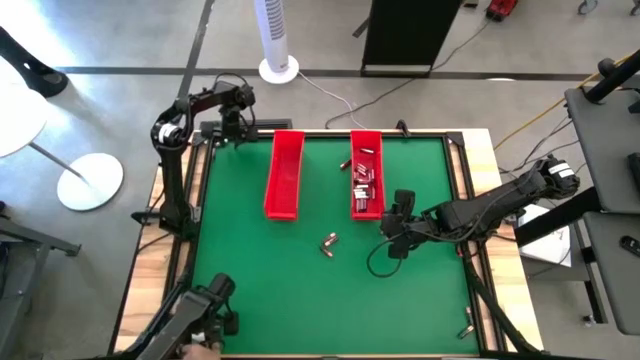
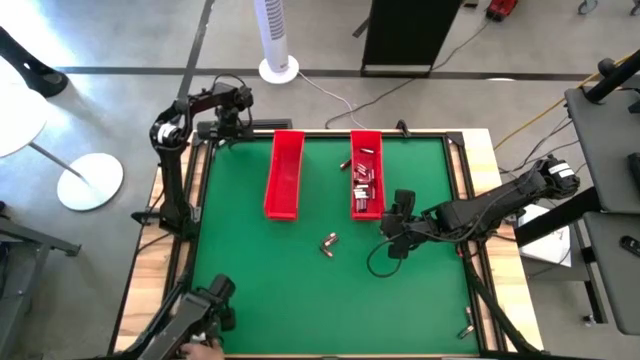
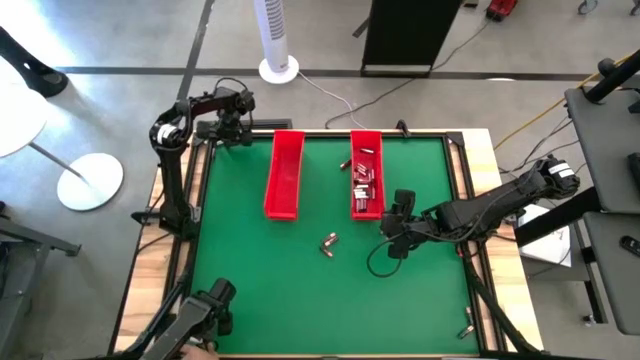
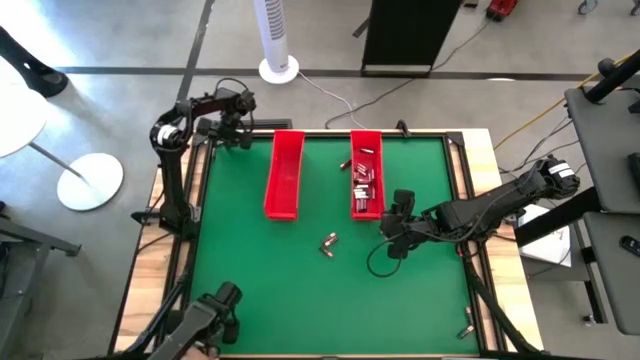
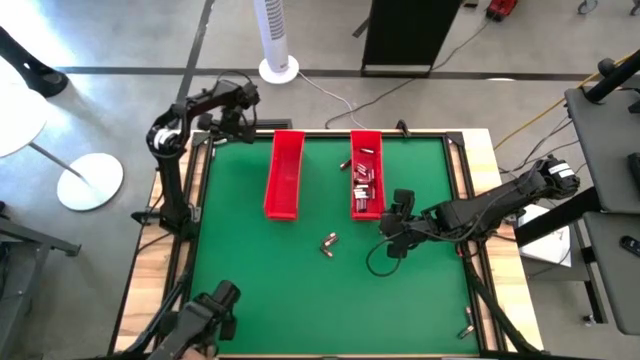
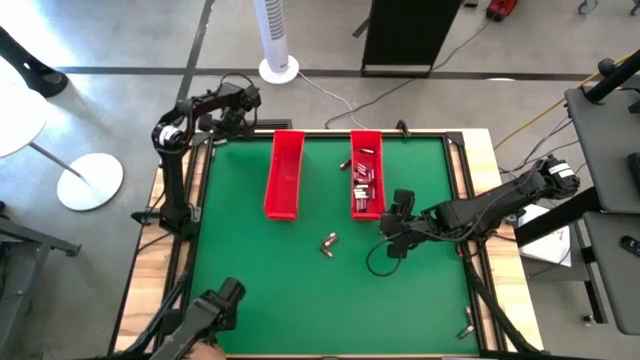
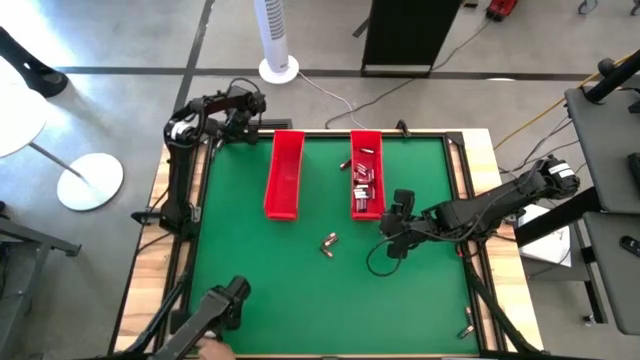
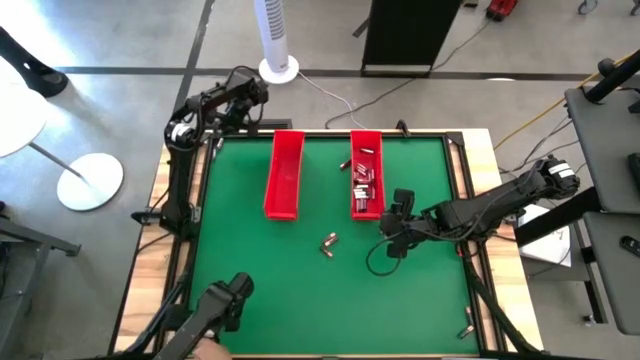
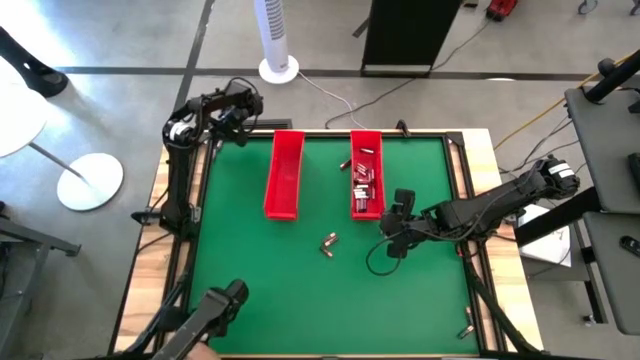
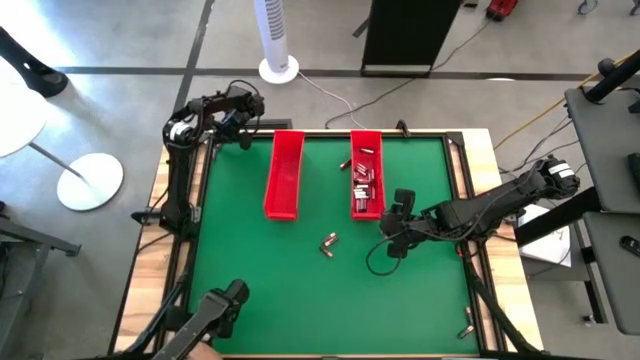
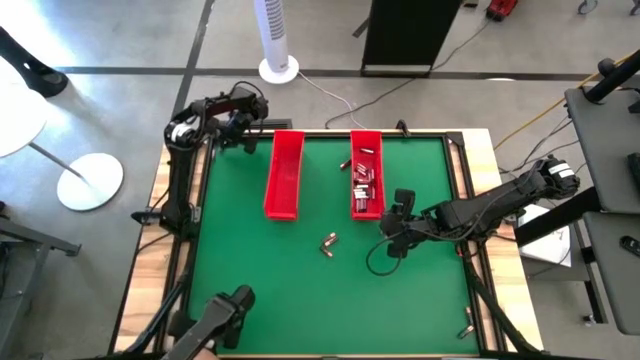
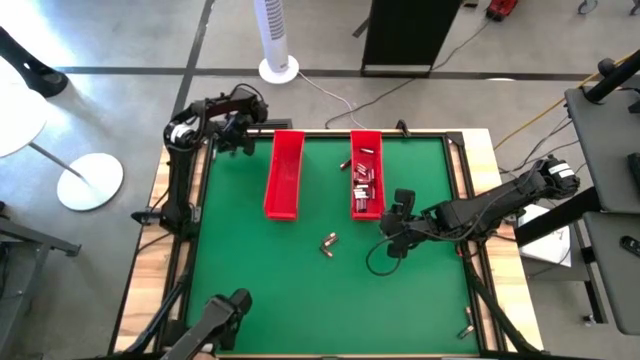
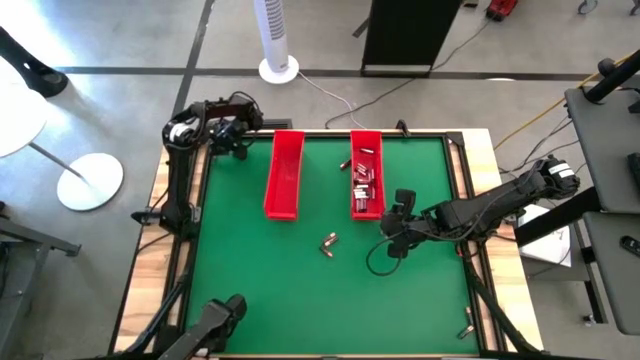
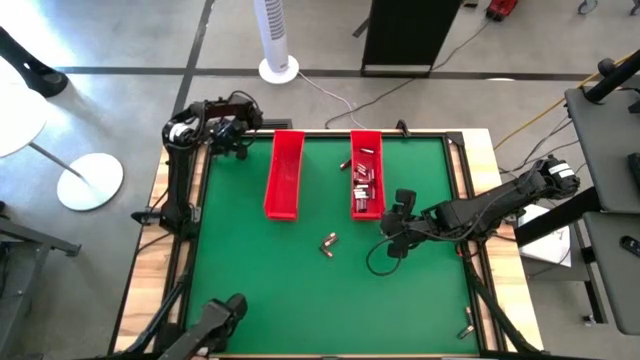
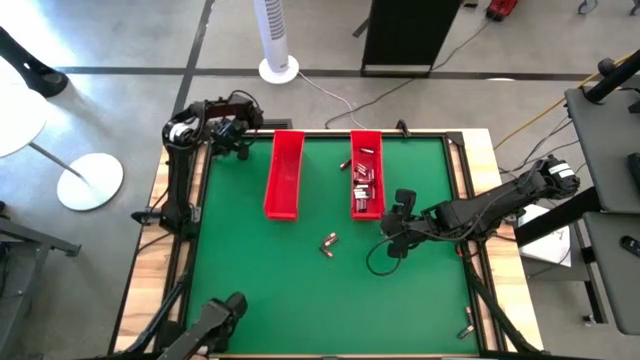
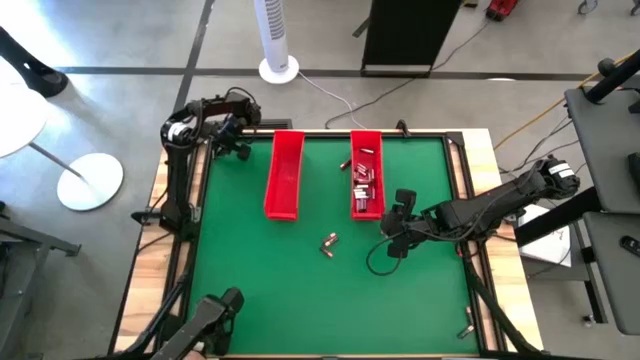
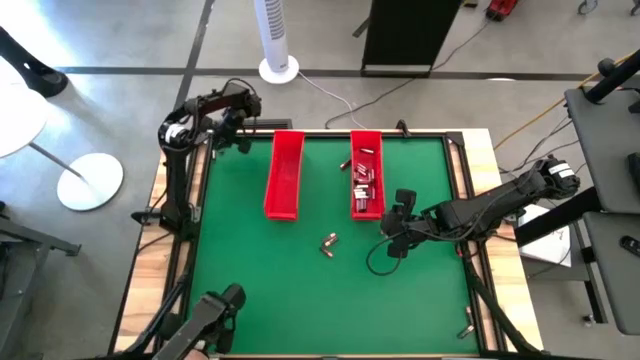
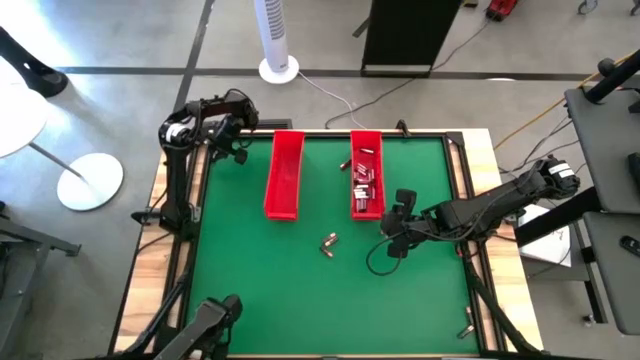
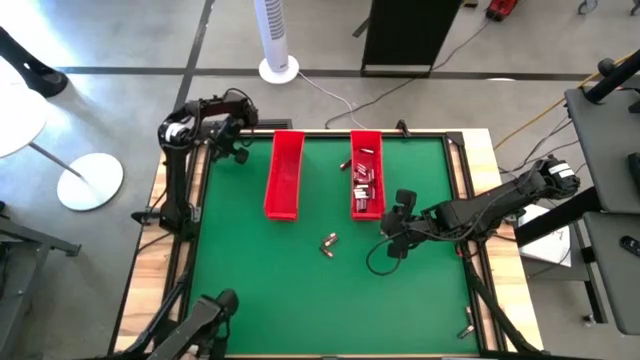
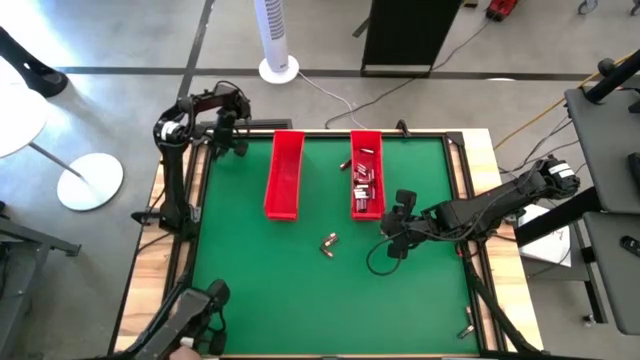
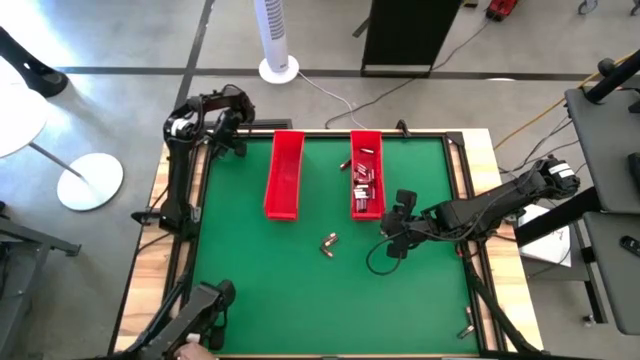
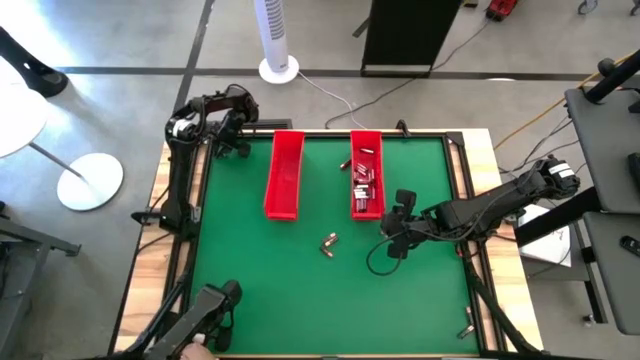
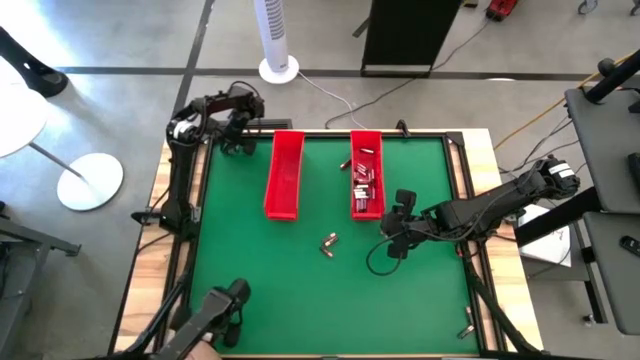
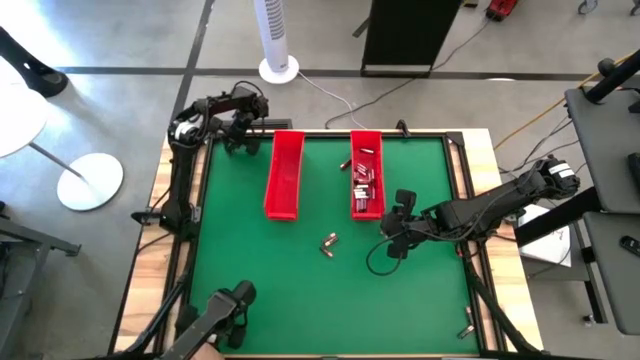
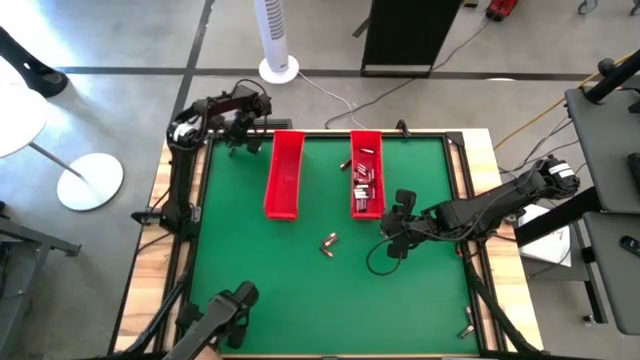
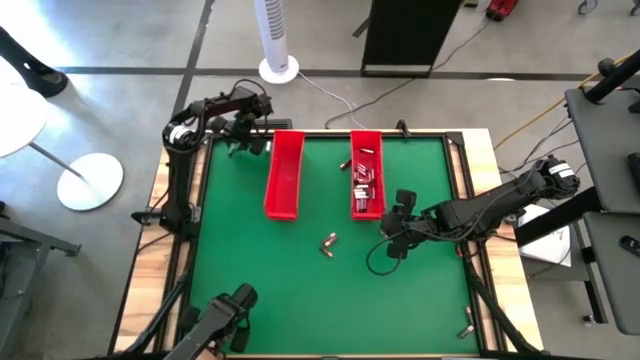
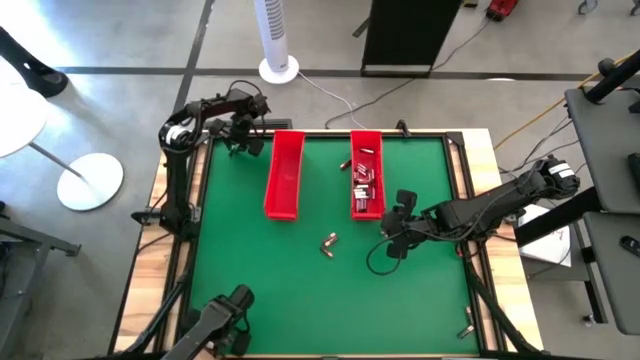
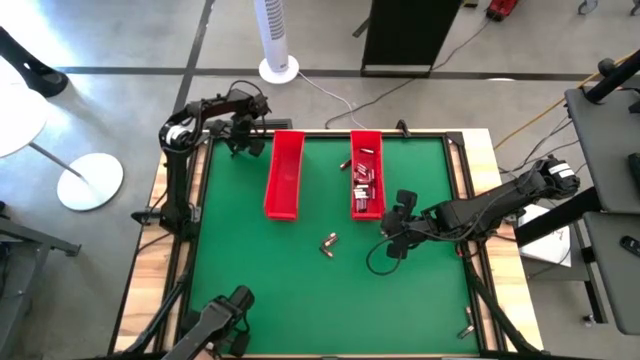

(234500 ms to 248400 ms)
Task: Sort batteries
Put the silver battery into the right red bin

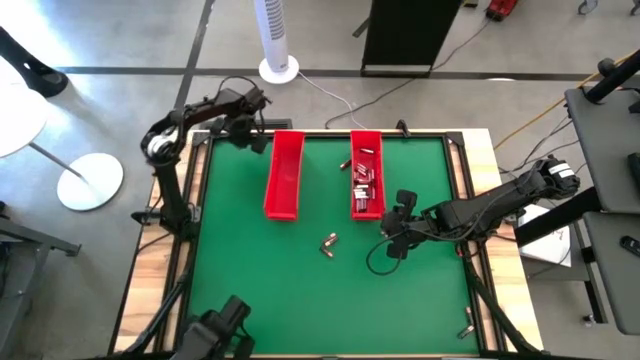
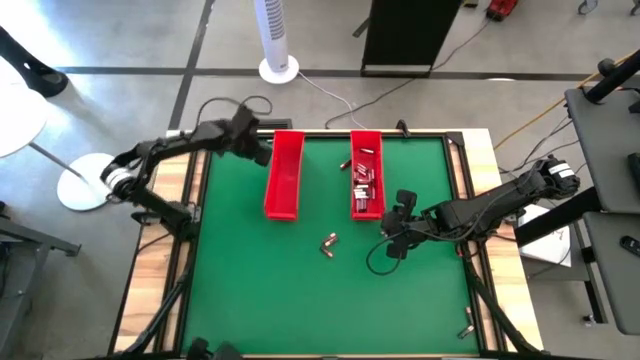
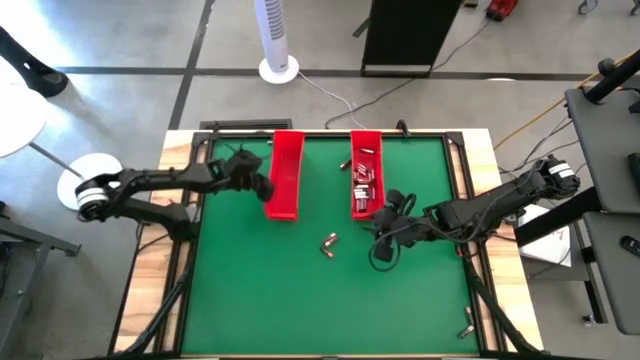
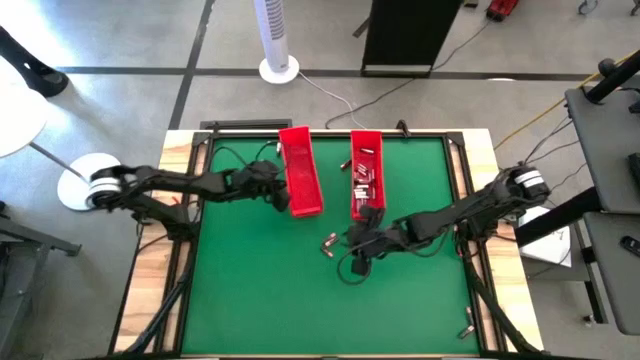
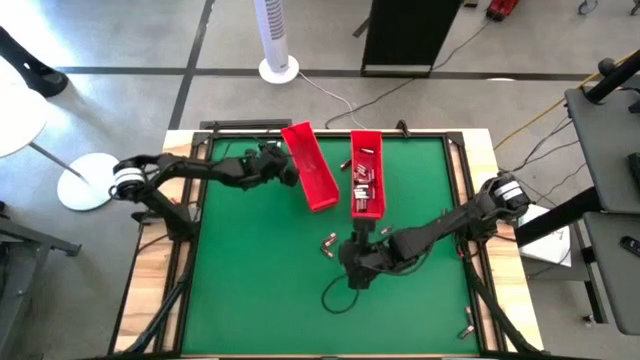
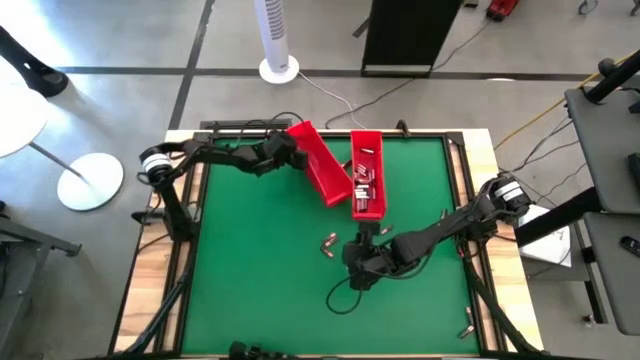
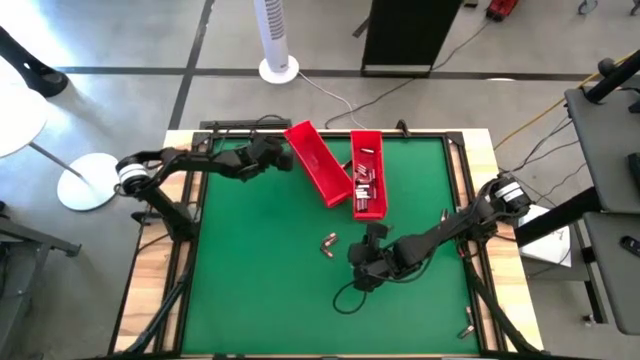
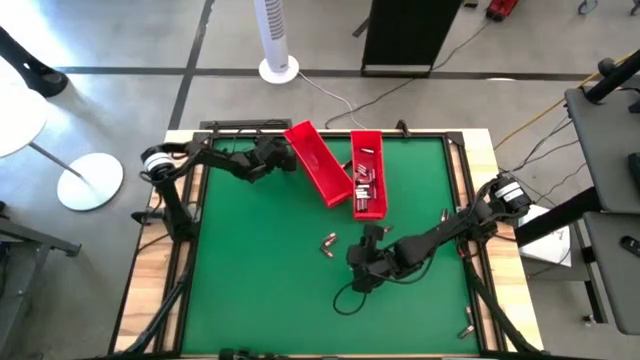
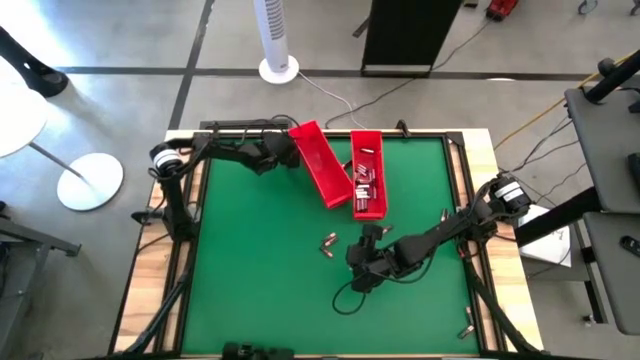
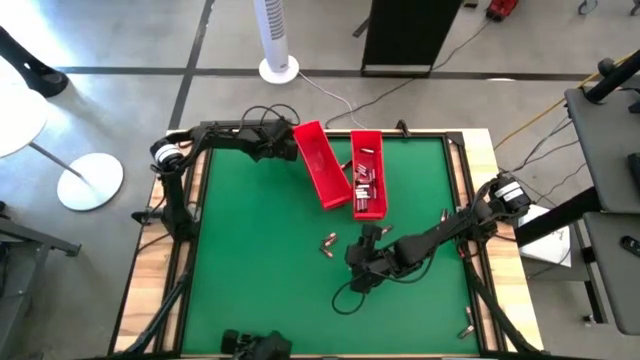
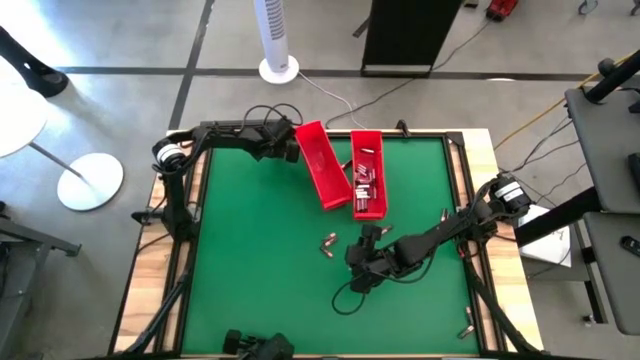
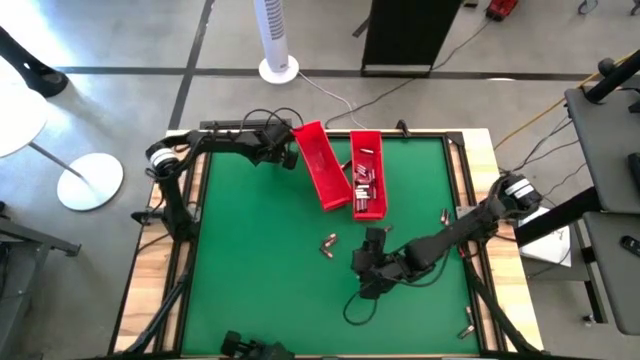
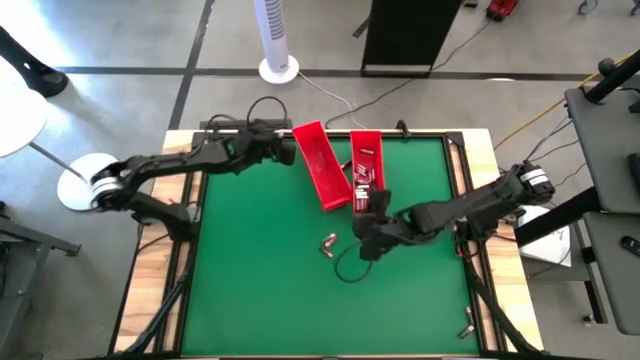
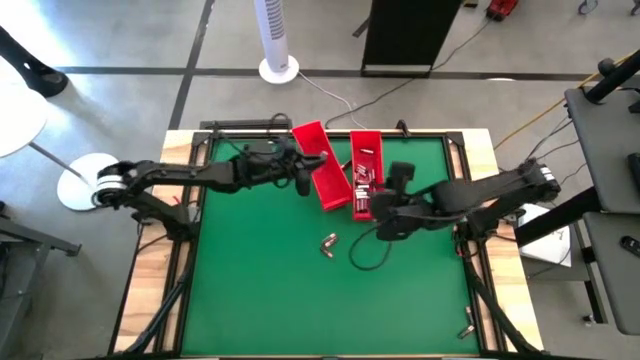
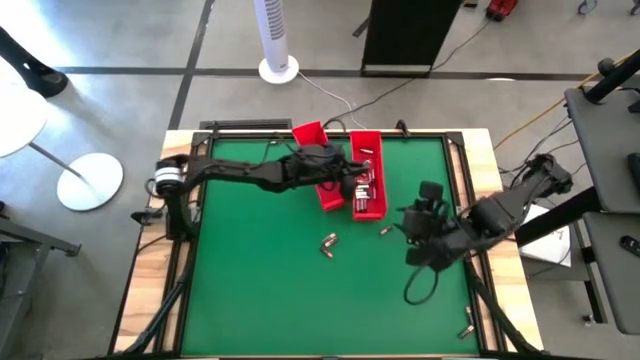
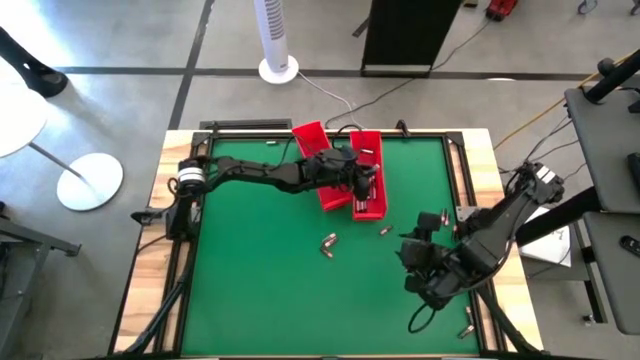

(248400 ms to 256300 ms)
Put the silver battery into the right red bin
